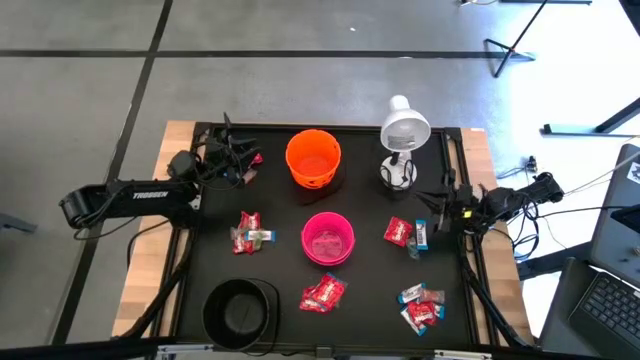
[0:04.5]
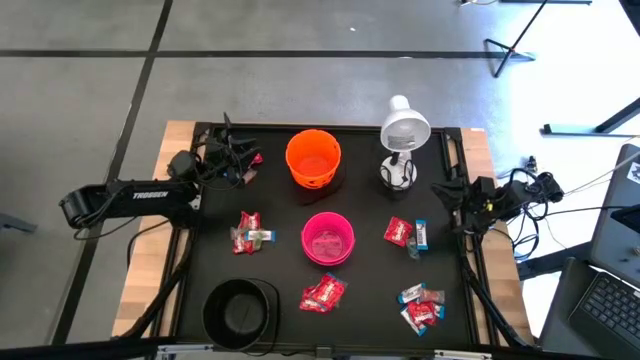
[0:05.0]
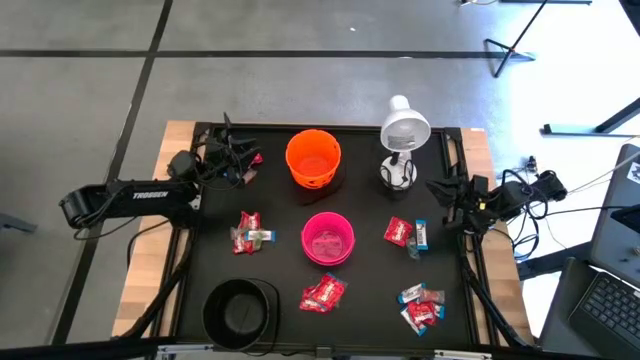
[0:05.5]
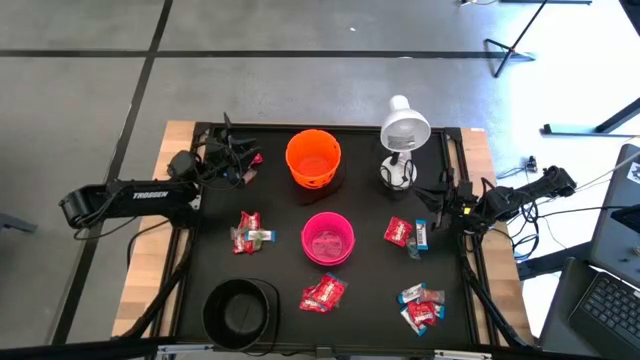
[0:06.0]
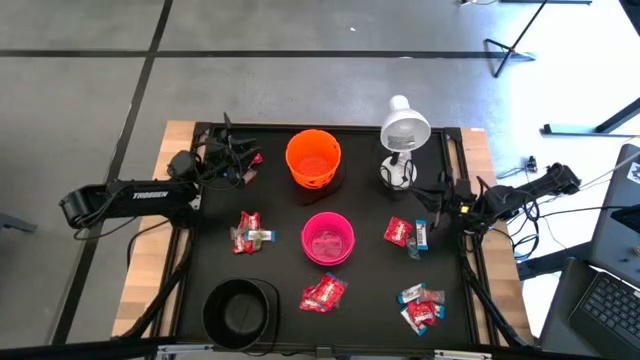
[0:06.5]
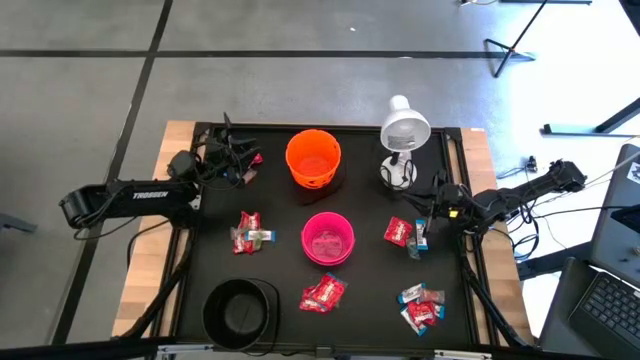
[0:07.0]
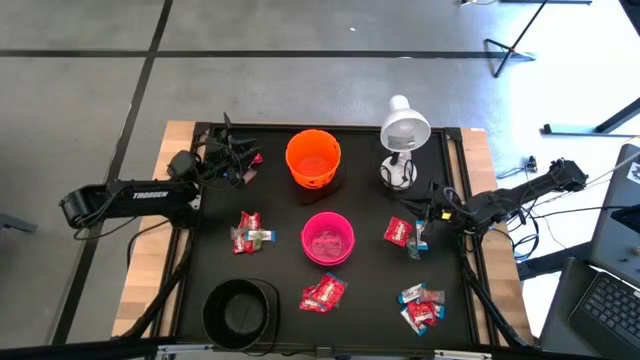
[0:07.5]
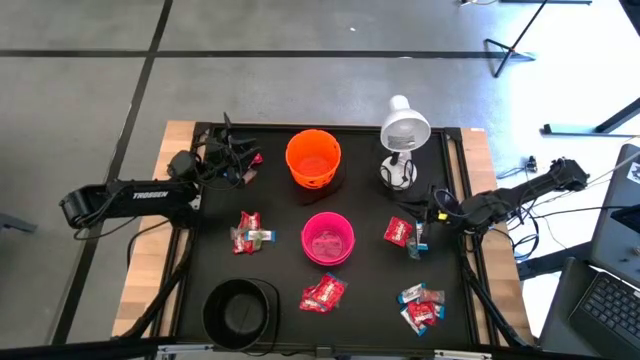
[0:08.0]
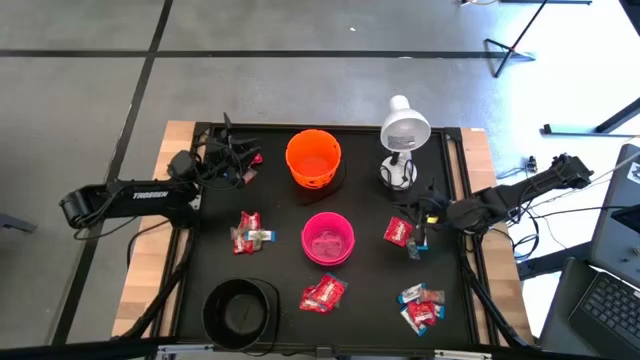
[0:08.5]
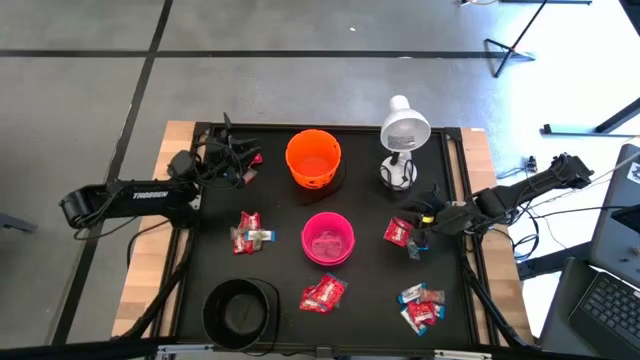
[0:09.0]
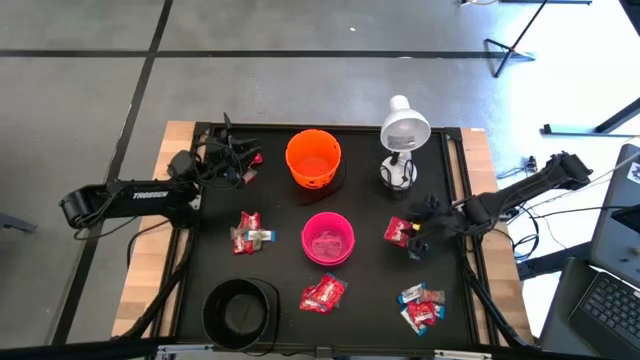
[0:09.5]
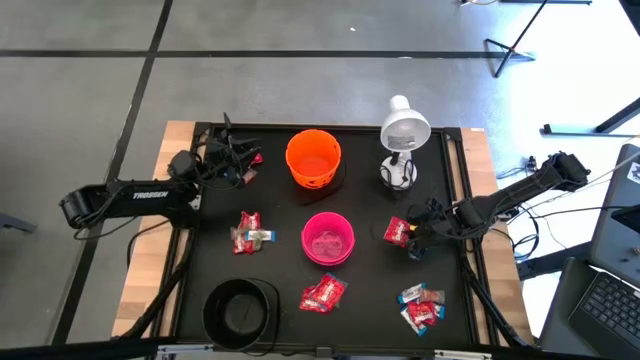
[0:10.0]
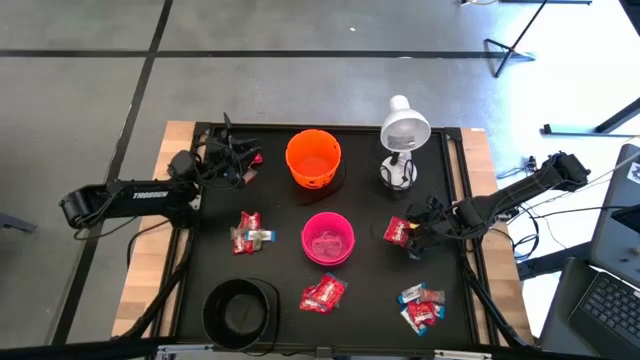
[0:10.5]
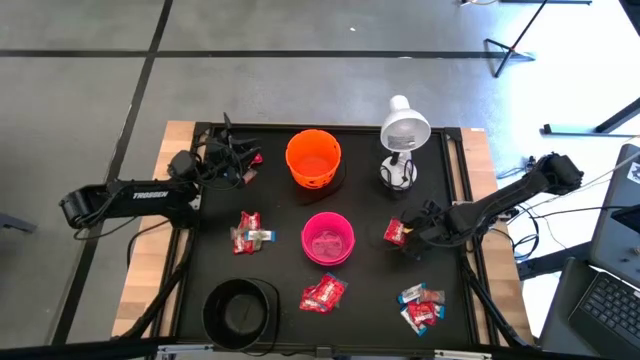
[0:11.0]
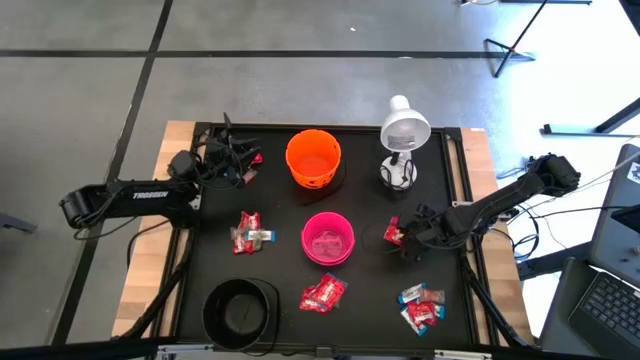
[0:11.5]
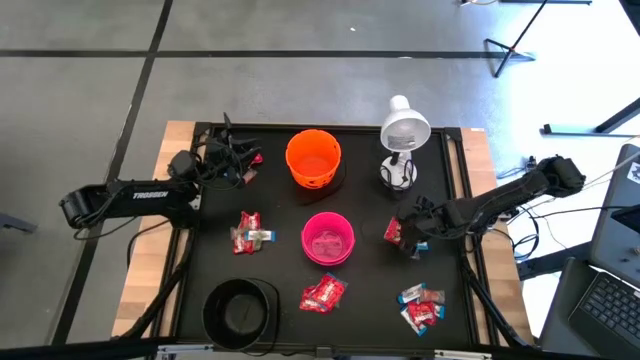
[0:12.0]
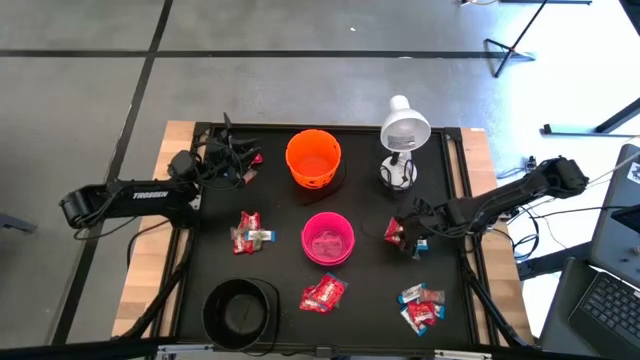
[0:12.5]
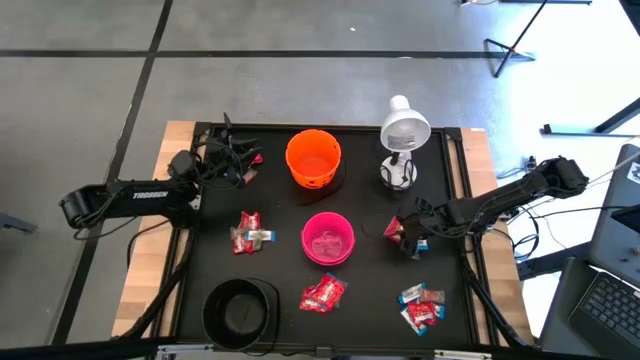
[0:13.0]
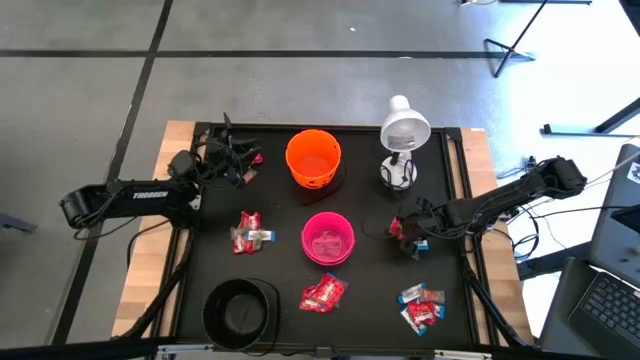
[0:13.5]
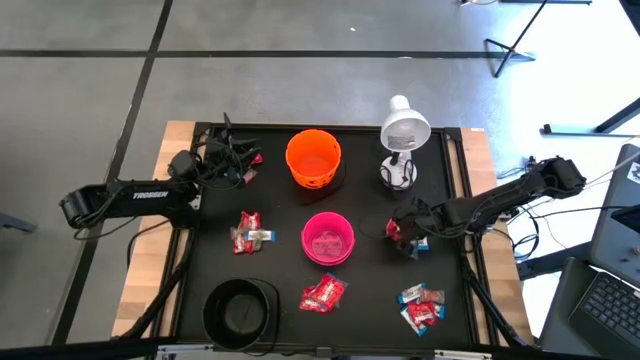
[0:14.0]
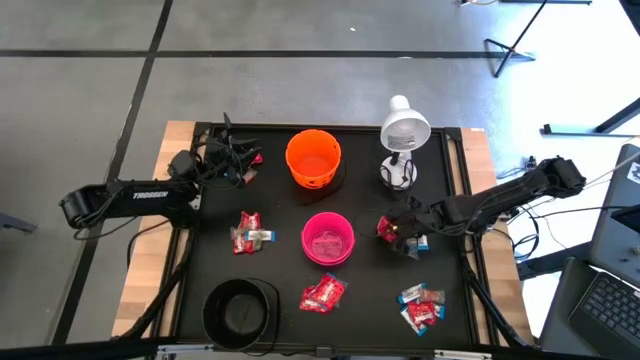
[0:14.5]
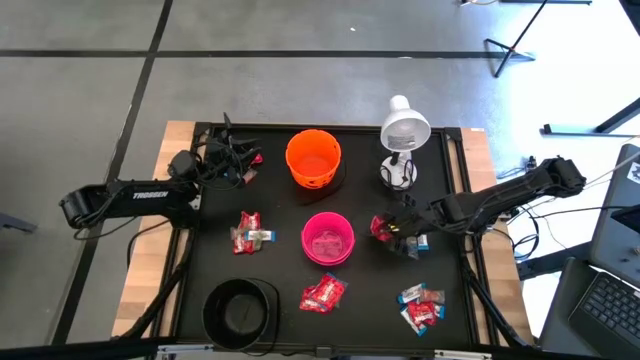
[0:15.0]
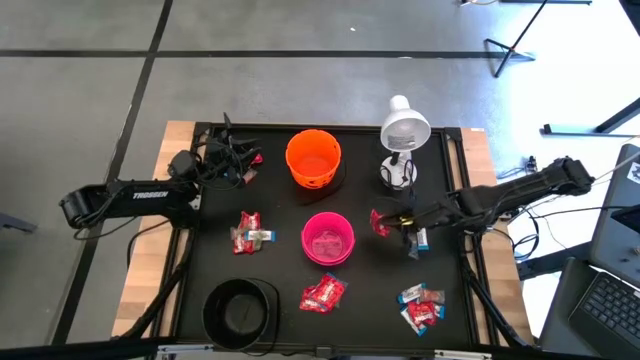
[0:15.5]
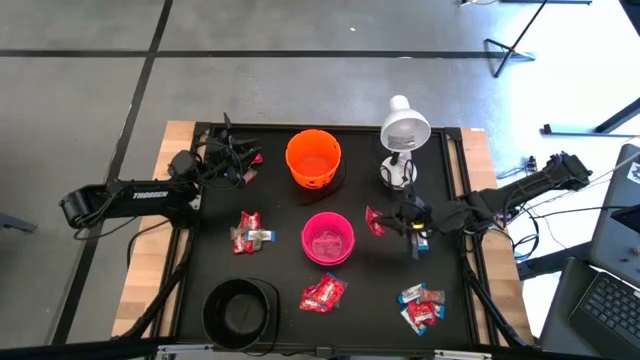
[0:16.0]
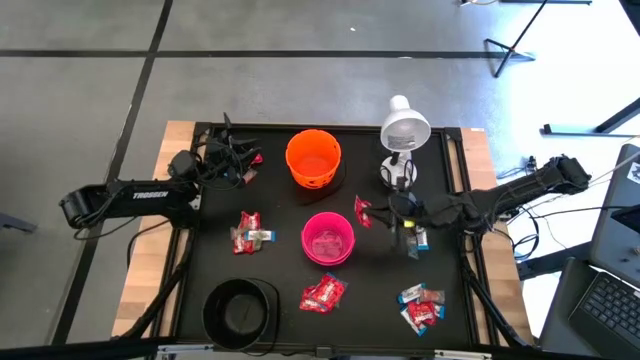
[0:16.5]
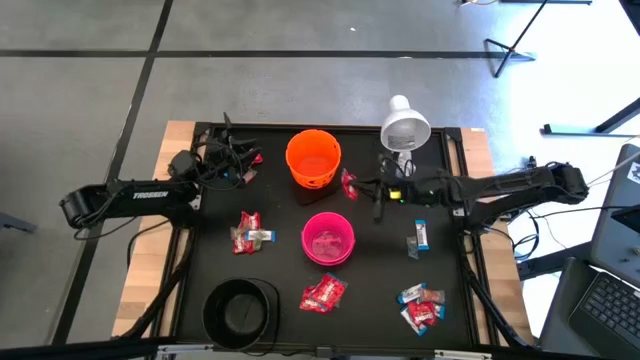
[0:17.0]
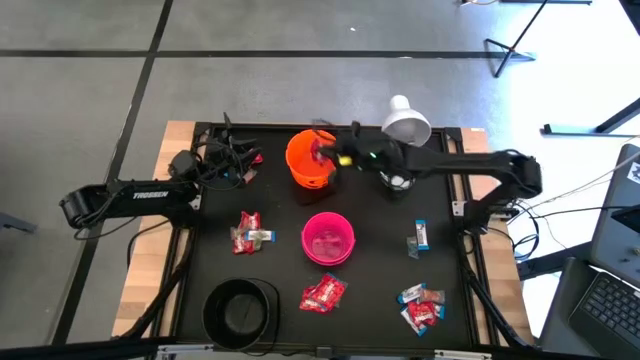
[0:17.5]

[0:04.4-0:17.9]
Task: Sort candy
Put the red candy into the orange bucket

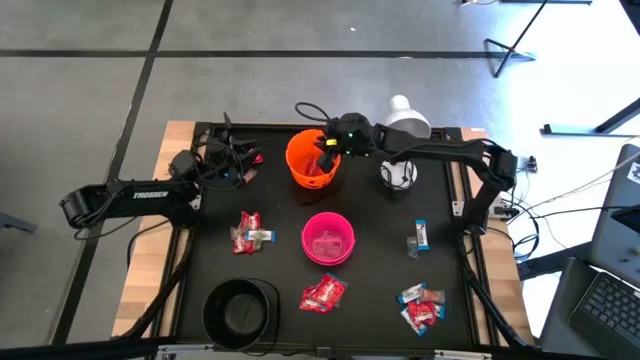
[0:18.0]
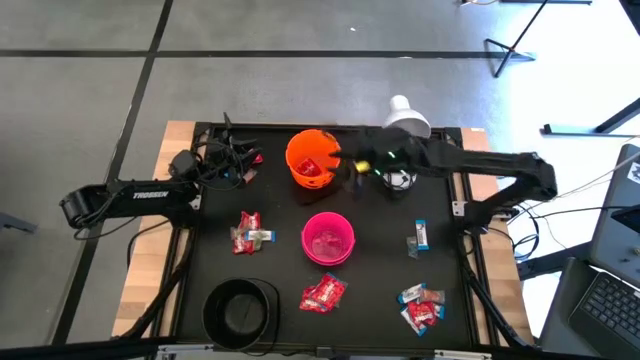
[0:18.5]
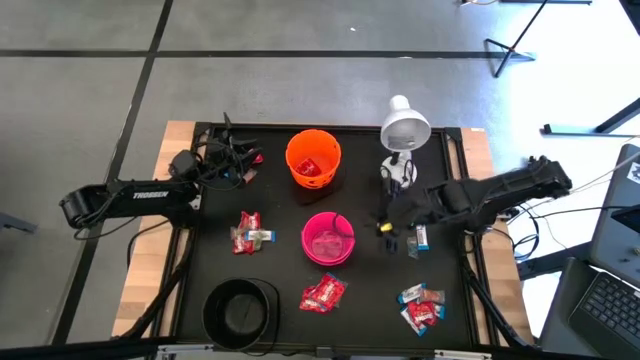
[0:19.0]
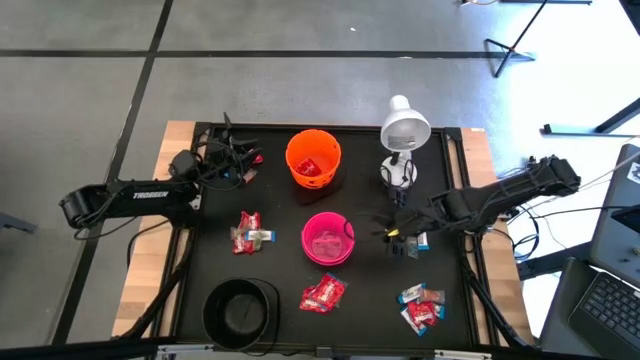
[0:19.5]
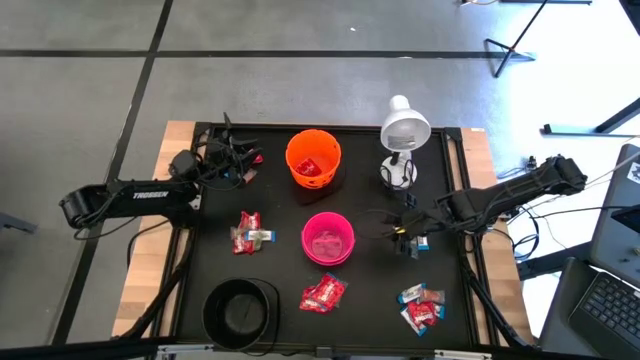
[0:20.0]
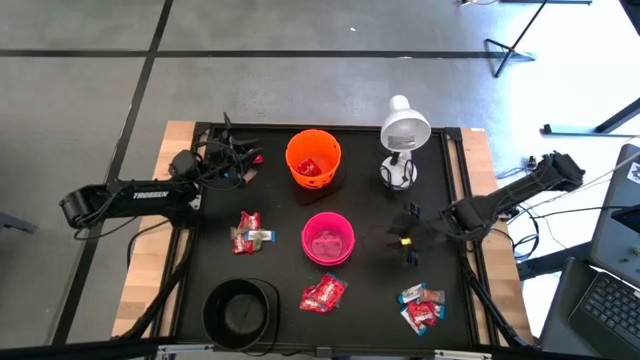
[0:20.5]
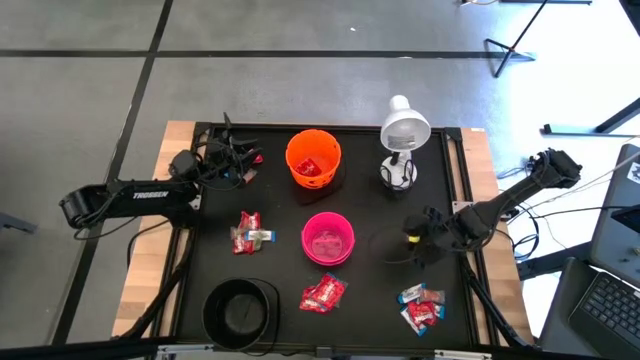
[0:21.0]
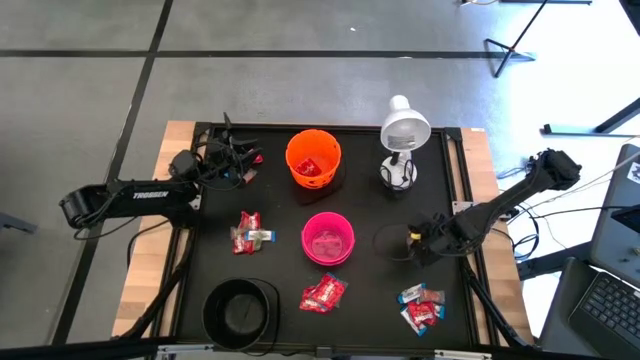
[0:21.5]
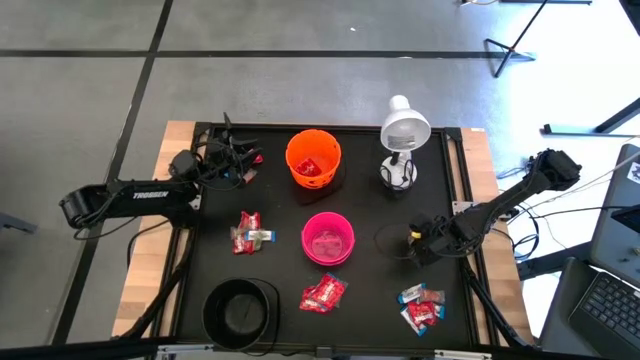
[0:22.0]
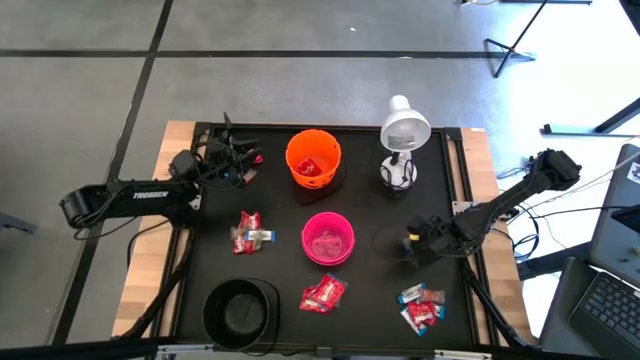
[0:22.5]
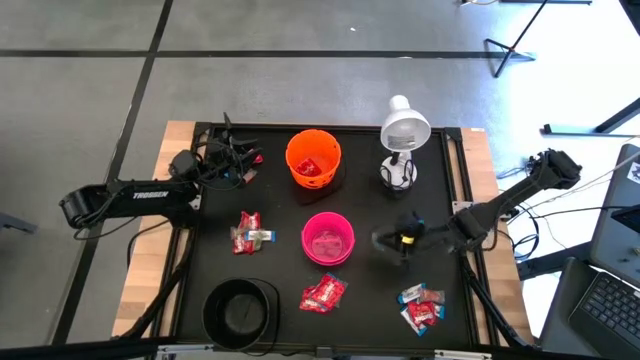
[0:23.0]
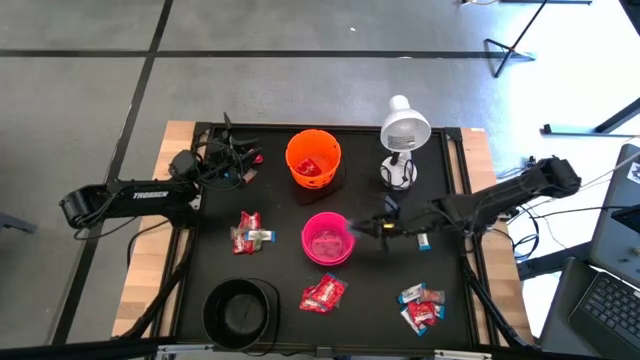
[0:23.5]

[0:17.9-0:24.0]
Put the gummy into the pink bucket
